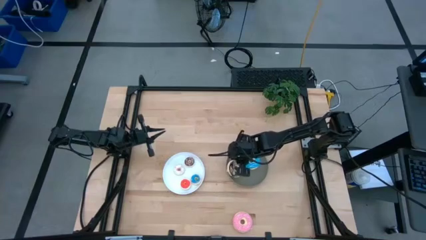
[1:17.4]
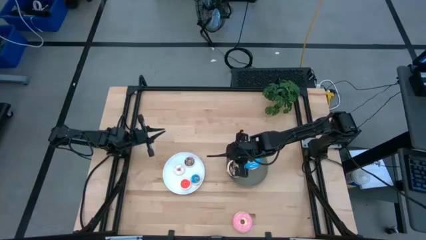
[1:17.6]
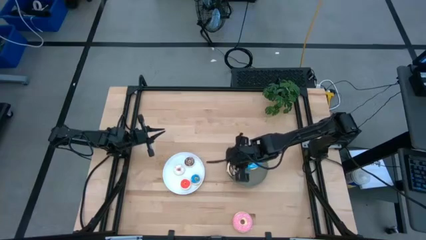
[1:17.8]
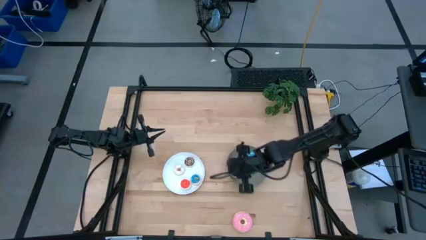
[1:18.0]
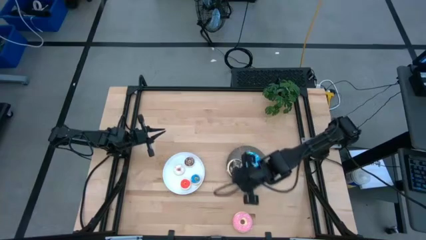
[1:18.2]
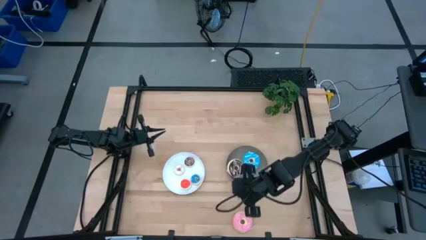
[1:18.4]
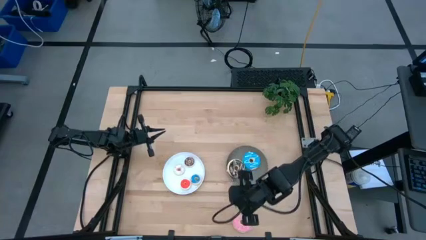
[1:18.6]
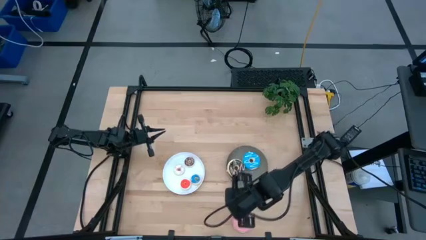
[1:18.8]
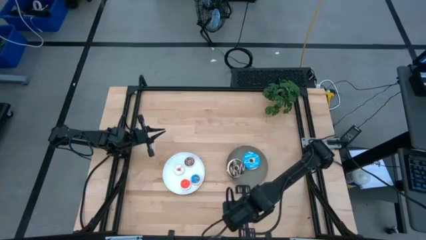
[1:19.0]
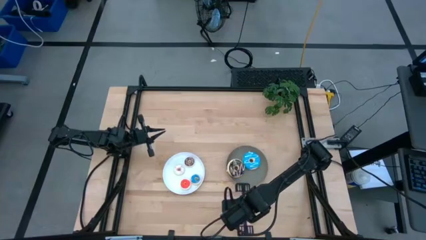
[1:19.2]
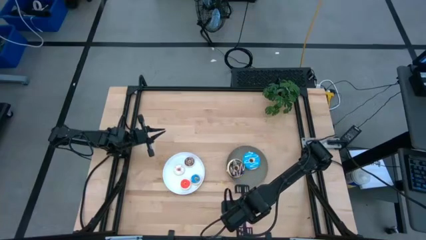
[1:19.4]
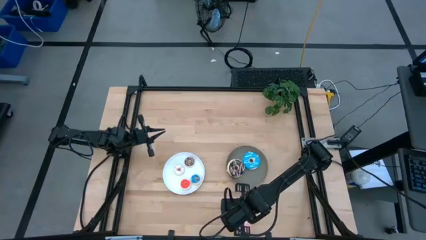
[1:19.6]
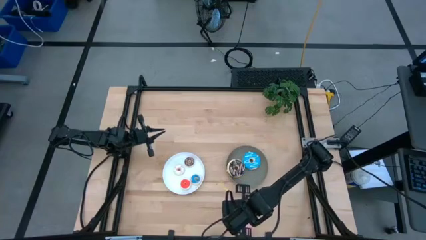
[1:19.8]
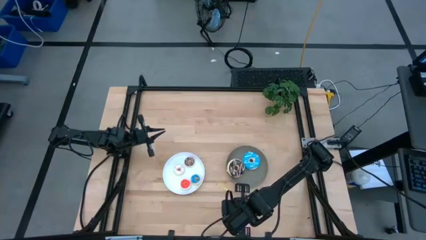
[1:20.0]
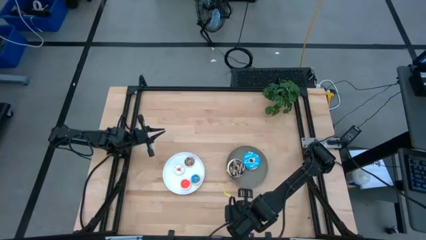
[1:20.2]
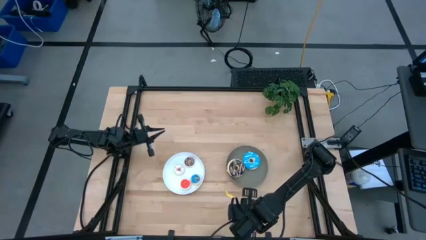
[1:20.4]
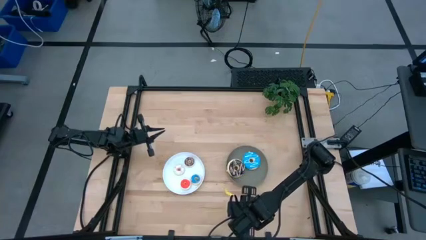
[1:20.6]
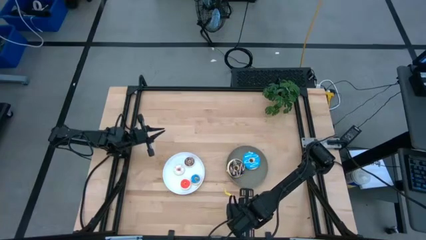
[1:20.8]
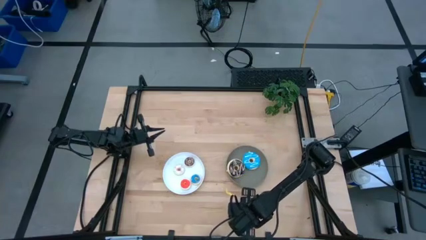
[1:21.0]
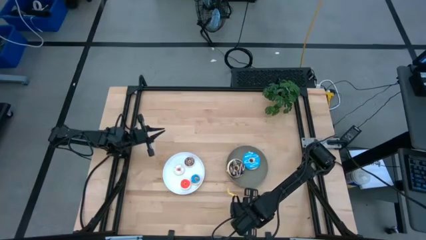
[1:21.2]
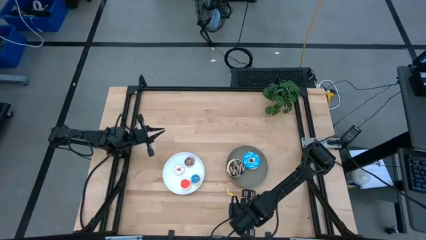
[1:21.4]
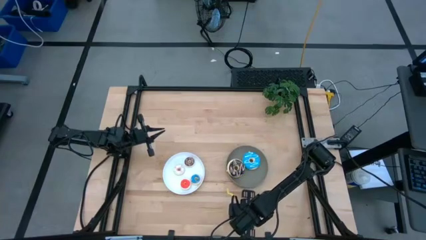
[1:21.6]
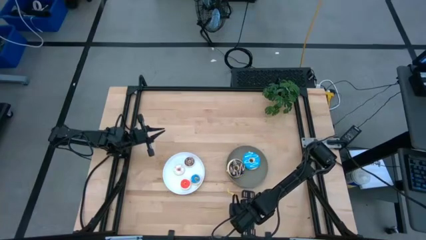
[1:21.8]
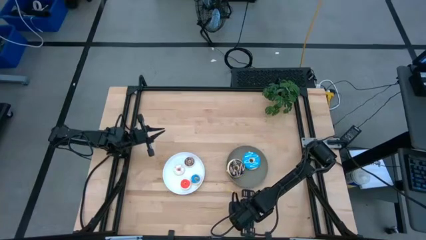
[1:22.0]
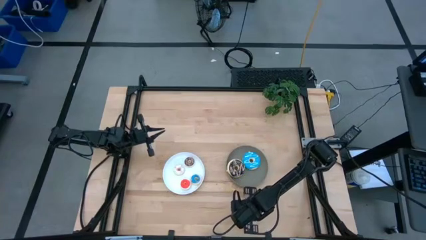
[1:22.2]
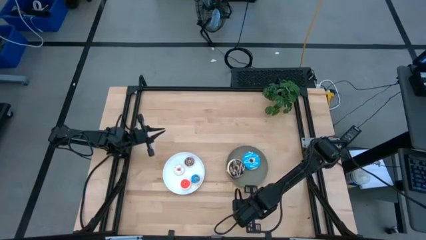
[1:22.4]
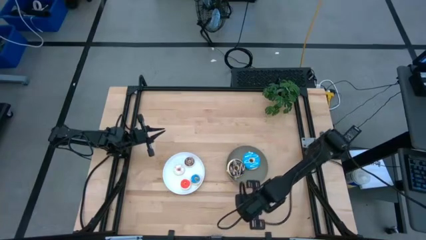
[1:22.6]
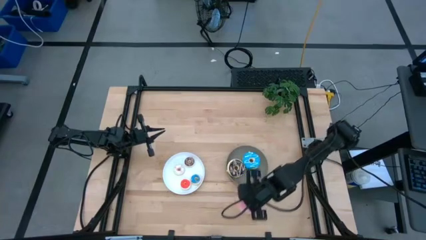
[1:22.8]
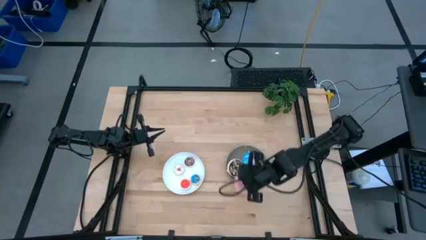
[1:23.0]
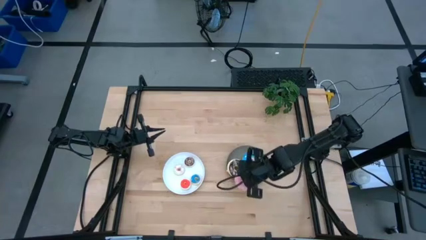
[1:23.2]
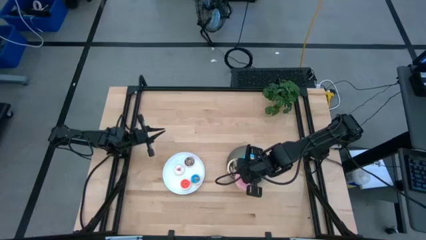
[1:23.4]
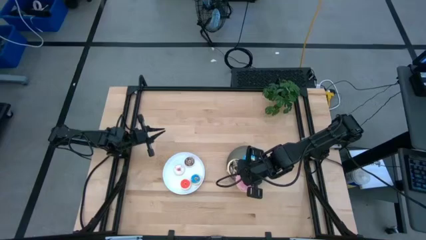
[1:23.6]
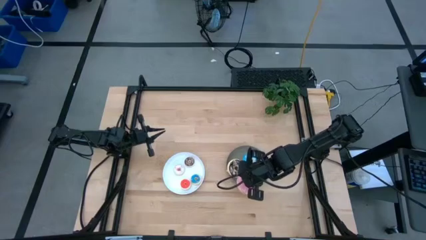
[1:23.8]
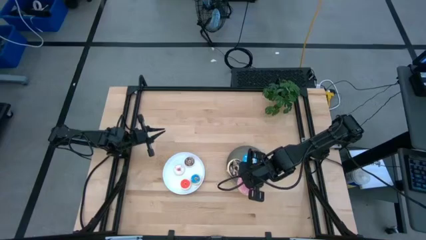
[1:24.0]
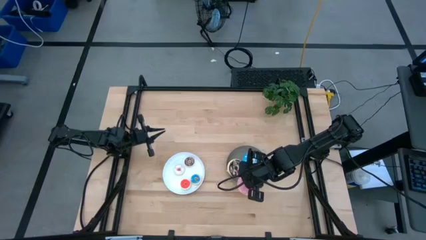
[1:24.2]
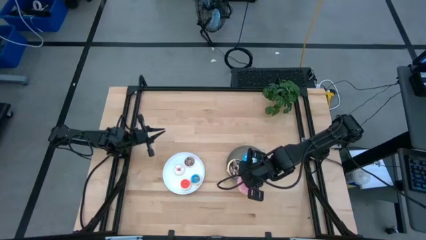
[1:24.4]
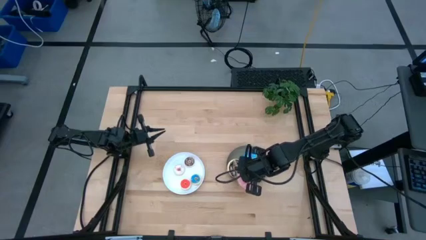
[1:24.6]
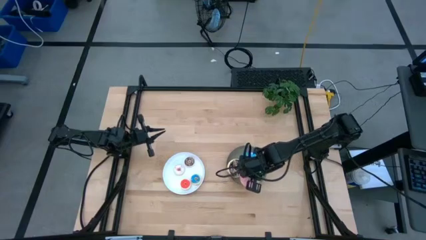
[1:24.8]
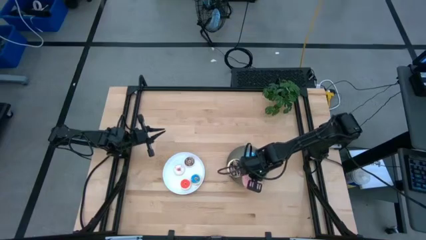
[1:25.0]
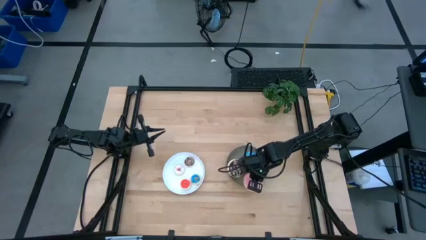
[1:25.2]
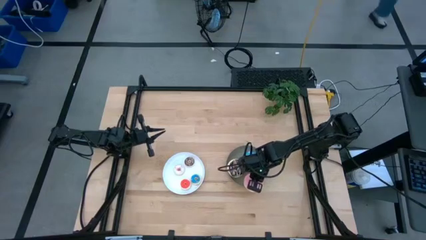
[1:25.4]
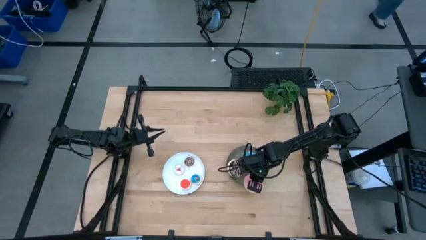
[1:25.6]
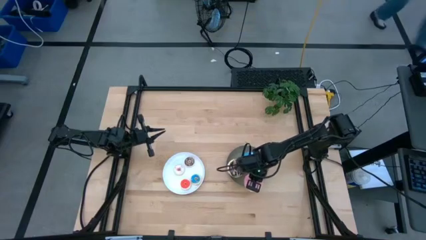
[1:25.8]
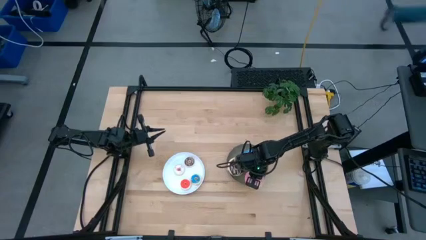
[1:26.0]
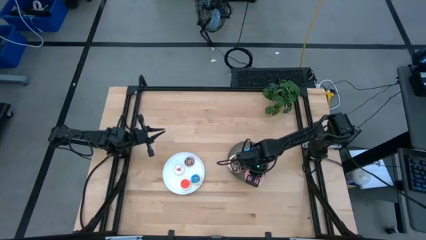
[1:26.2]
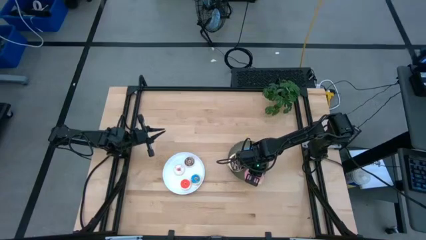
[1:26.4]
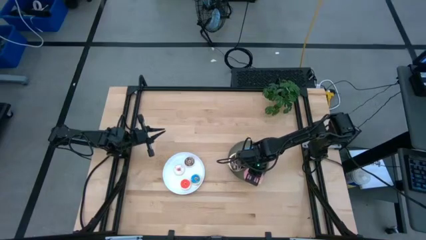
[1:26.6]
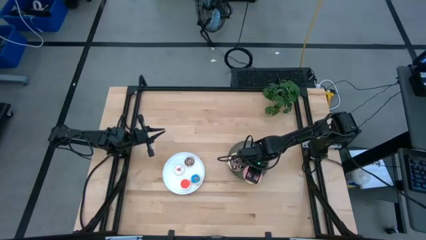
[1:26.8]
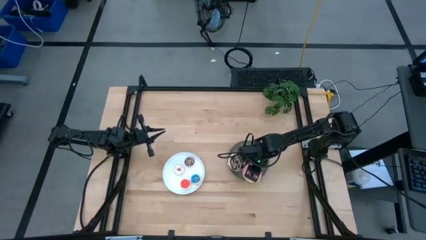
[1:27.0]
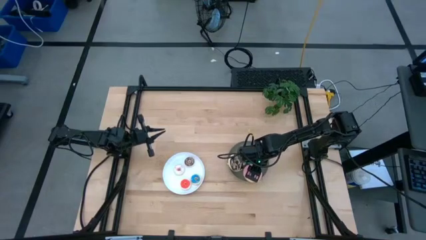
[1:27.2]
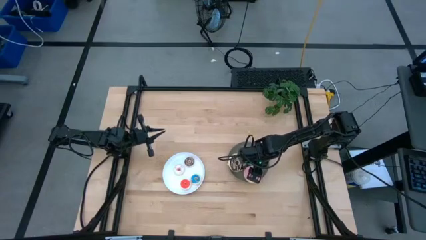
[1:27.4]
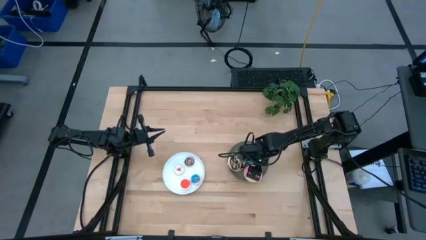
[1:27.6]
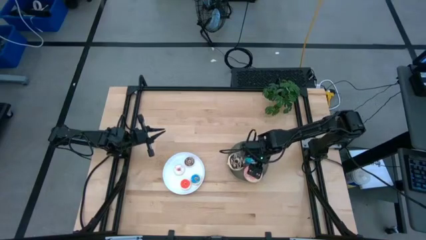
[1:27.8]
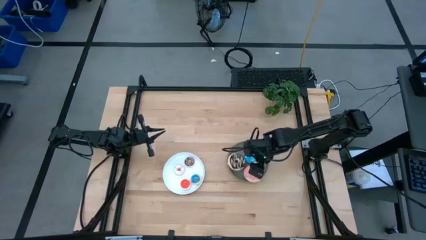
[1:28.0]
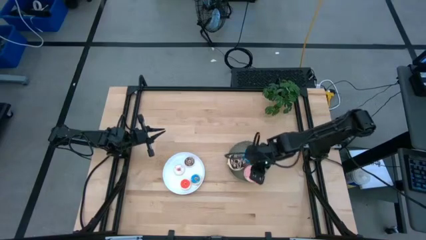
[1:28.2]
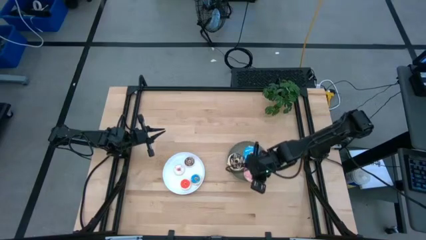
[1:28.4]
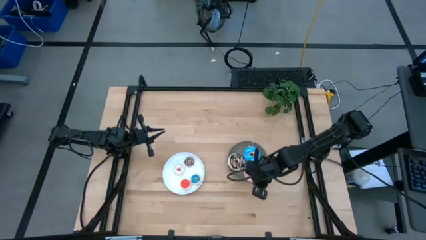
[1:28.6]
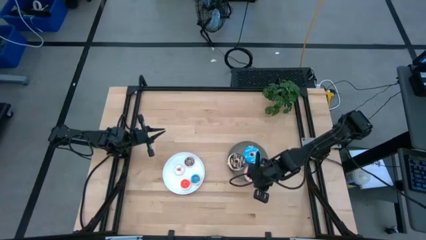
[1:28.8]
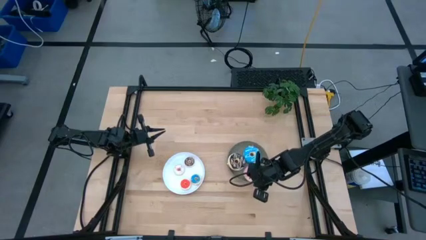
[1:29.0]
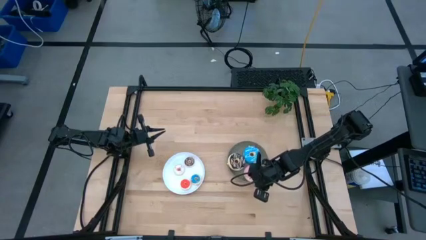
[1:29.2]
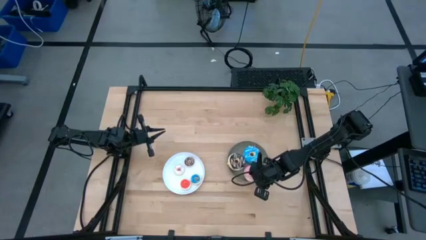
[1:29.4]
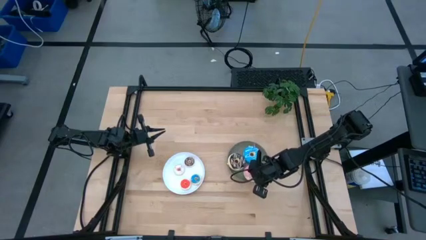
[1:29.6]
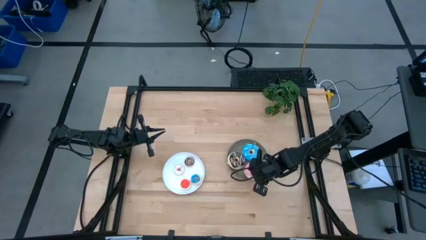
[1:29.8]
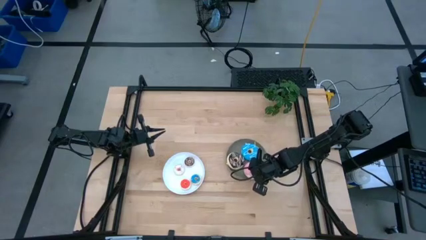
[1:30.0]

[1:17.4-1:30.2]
Task: Pick & Place donuts
Put the large pink donut on the gray plate
